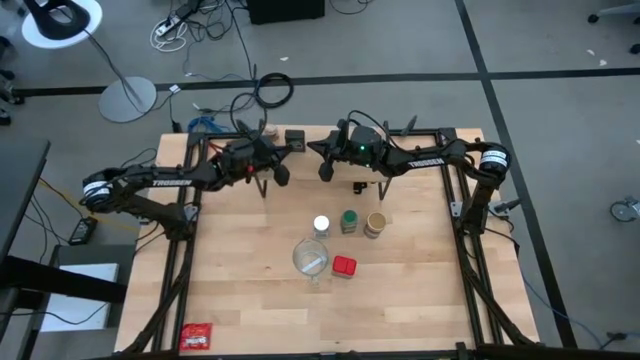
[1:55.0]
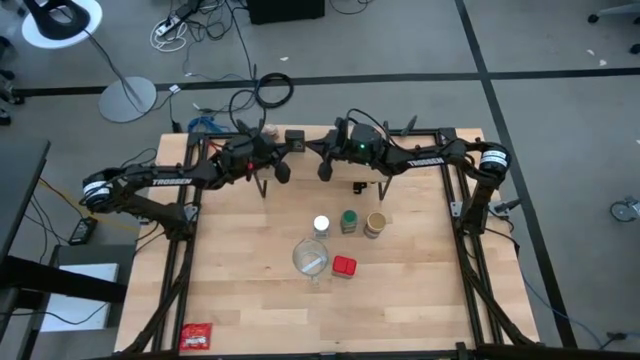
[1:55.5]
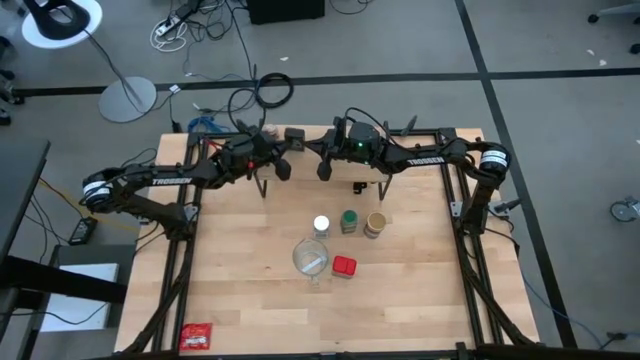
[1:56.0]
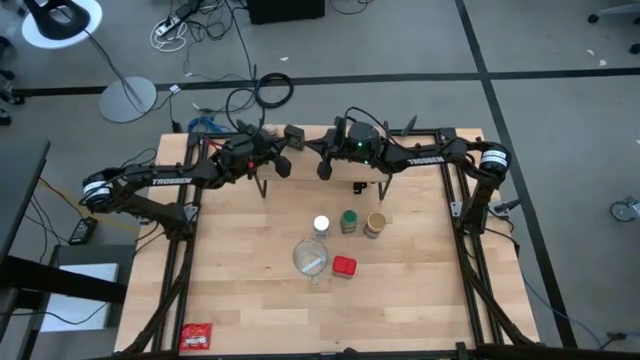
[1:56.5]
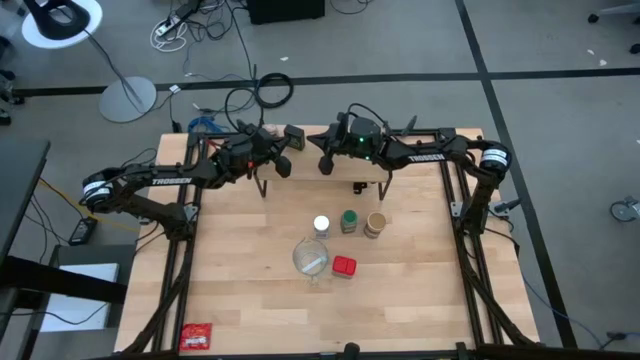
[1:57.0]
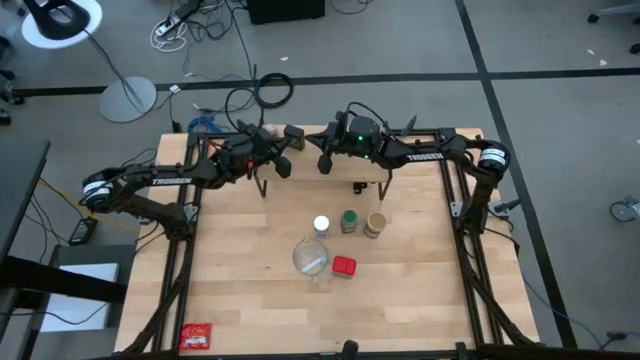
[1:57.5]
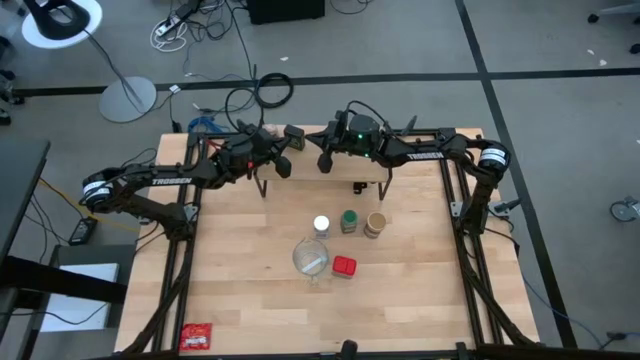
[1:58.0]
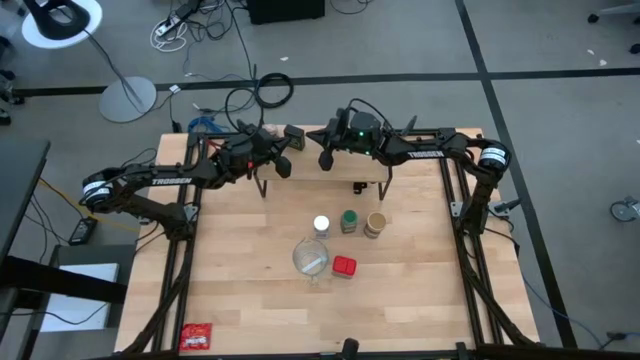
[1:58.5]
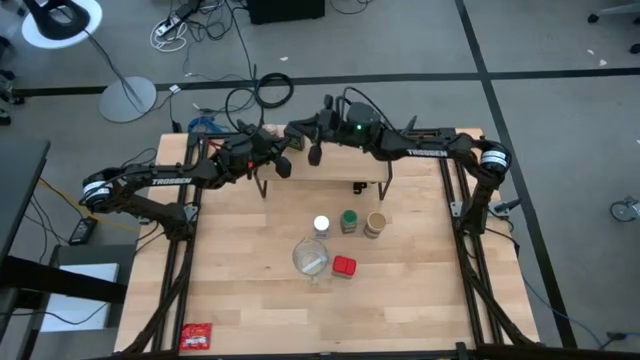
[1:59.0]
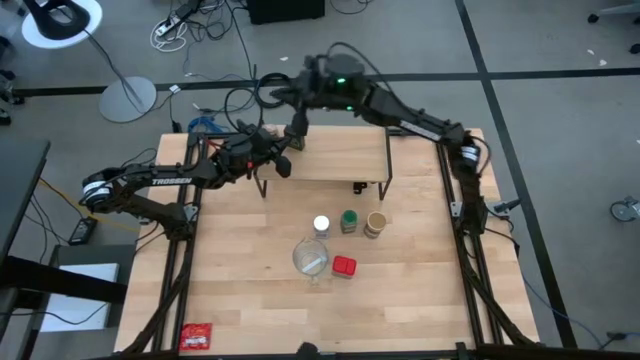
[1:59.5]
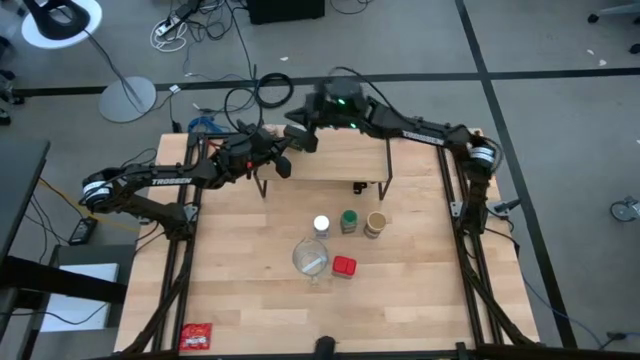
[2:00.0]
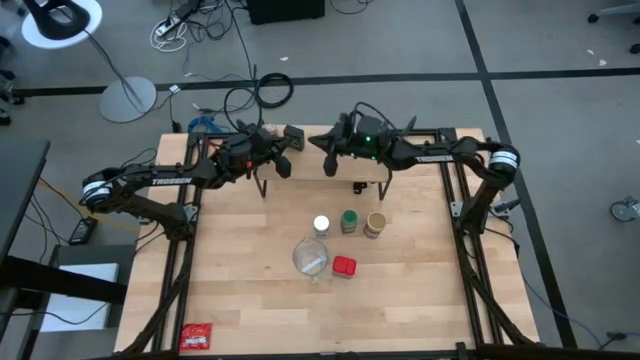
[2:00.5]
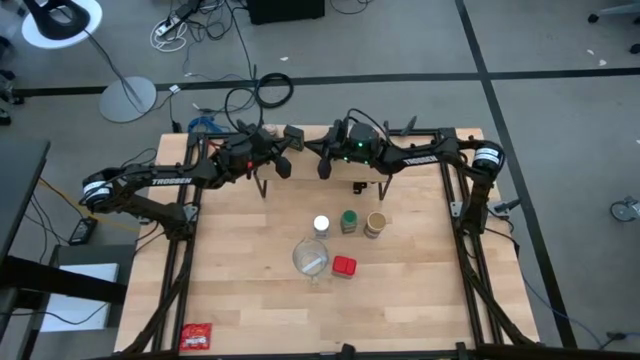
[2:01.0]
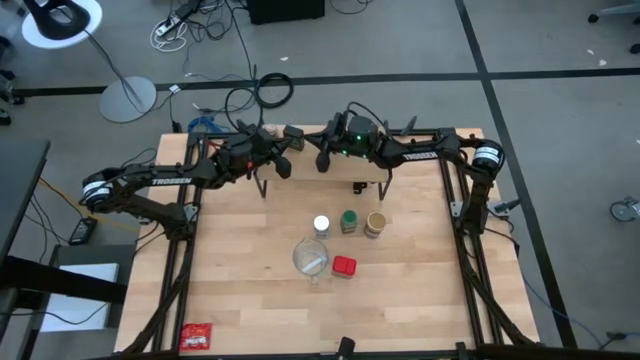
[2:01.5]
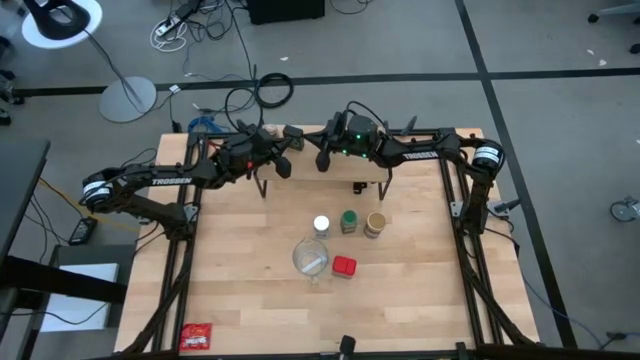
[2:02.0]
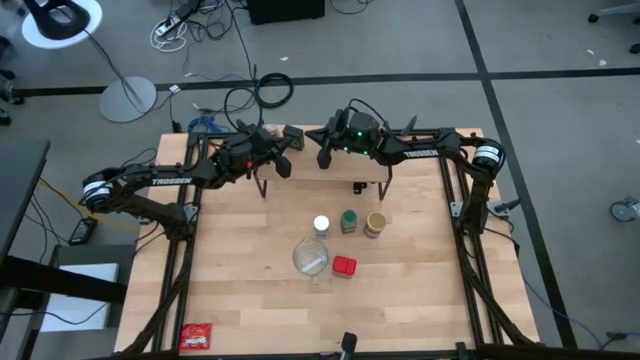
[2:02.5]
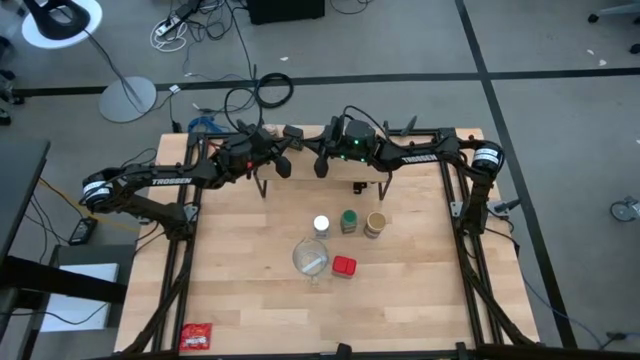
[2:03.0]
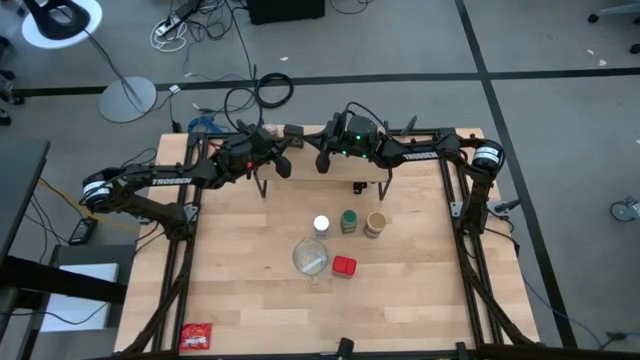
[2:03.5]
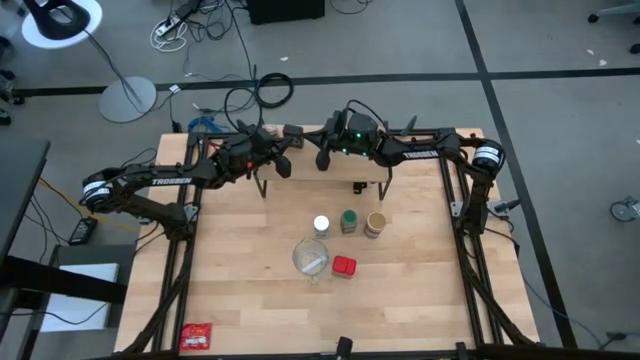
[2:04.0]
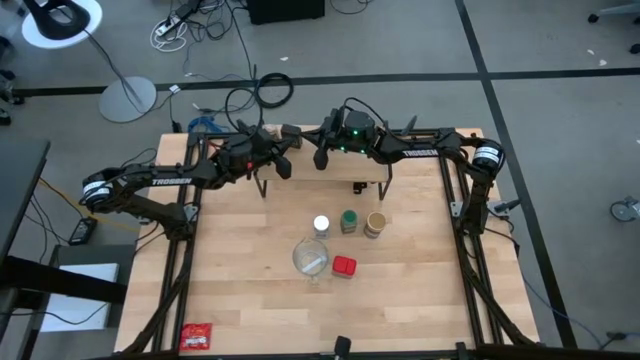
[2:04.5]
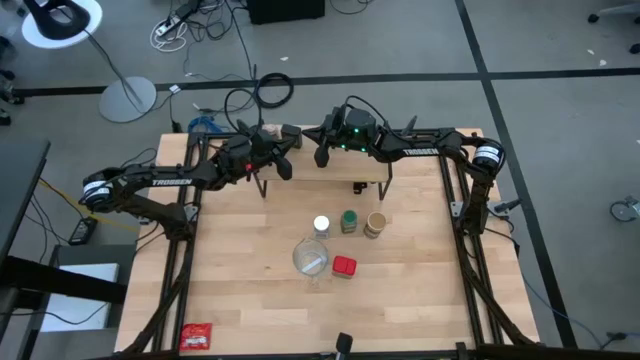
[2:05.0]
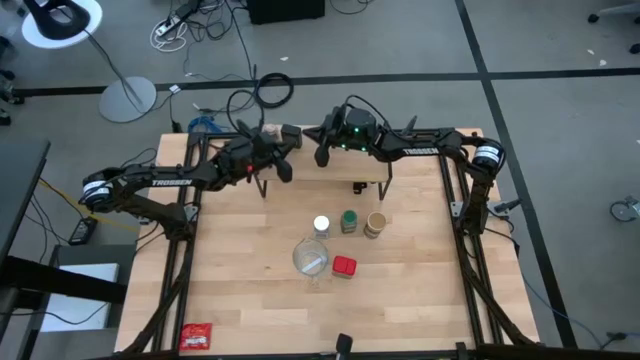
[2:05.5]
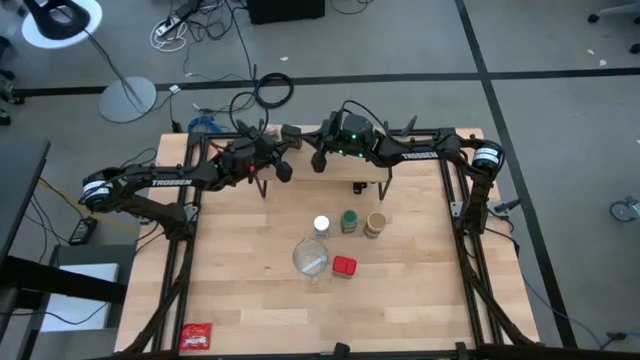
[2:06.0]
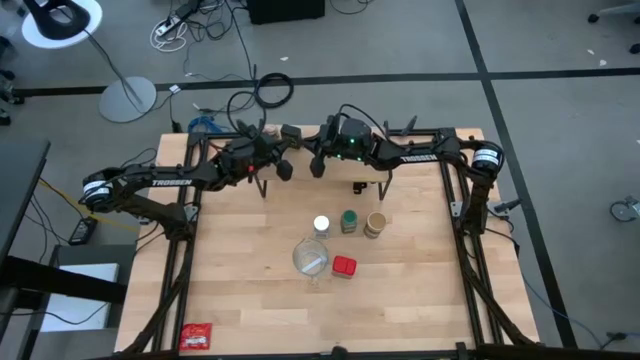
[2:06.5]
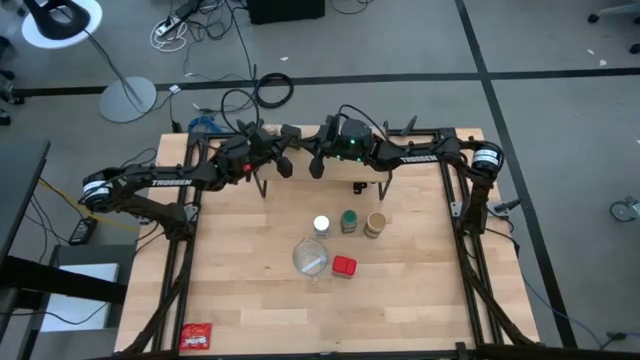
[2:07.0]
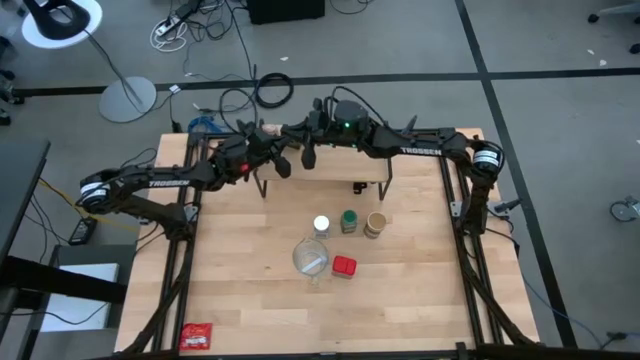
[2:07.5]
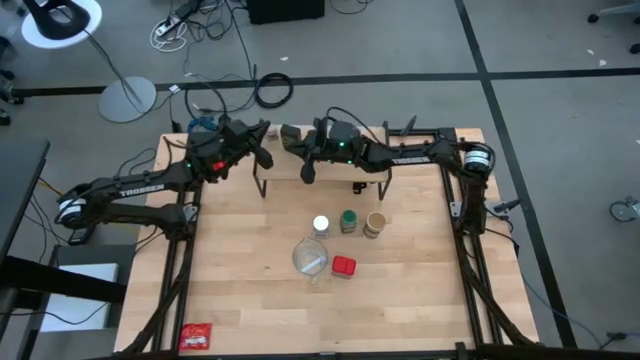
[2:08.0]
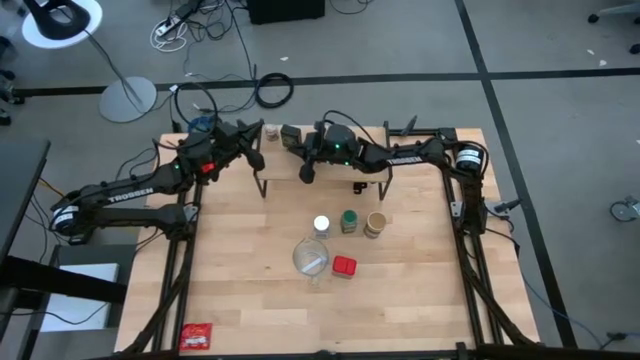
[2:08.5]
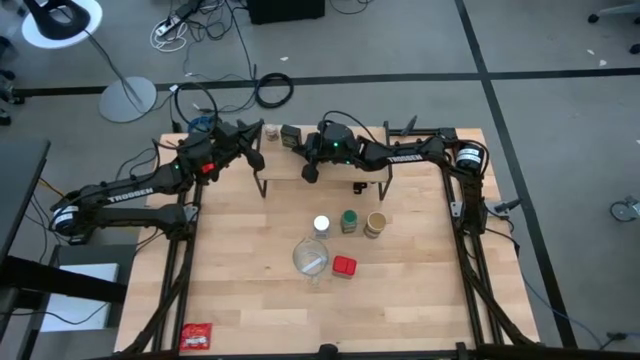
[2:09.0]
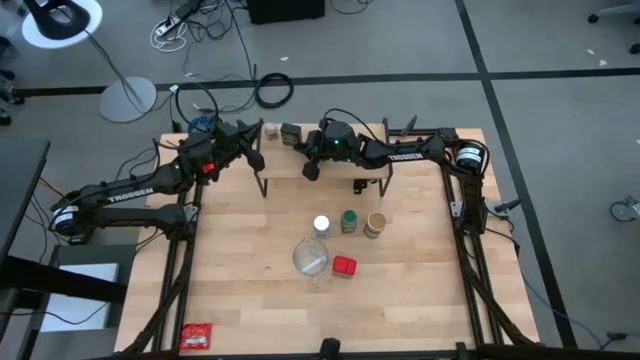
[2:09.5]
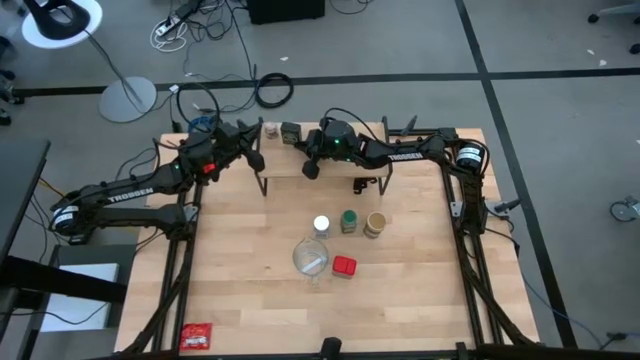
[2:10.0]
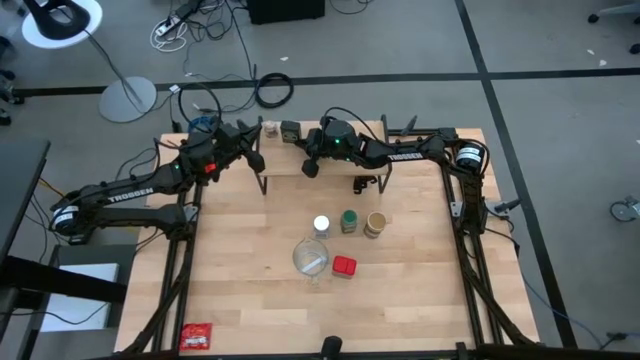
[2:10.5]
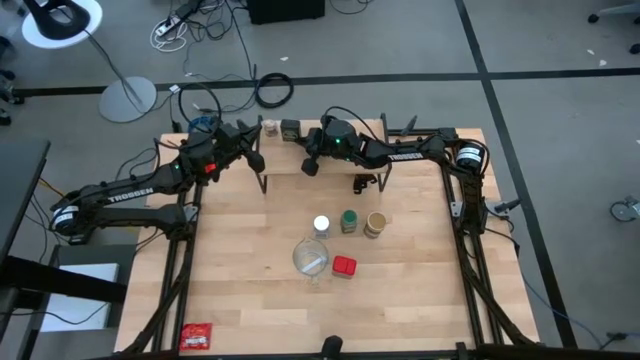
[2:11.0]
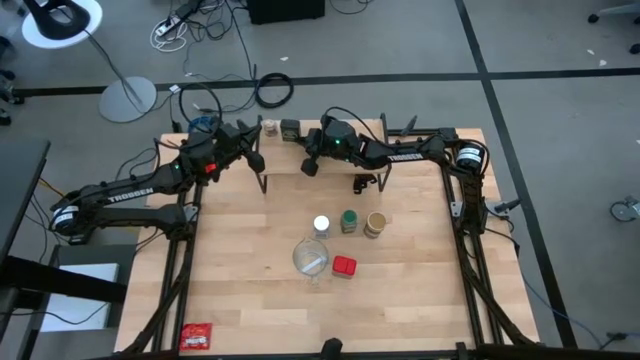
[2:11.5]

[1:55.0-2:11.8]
Task: Shelf spices
Put the black seasoning can on the shelf
